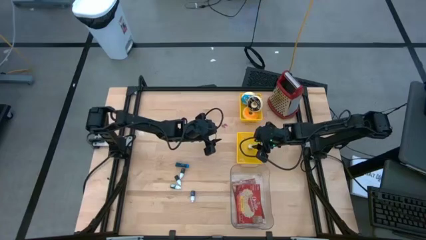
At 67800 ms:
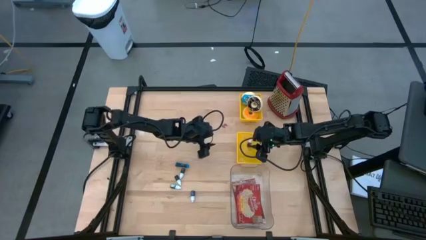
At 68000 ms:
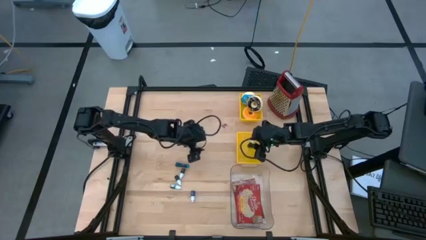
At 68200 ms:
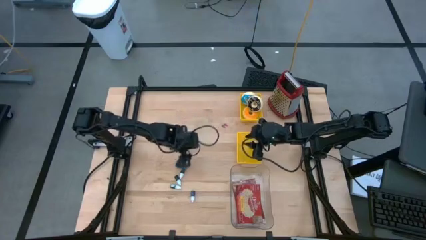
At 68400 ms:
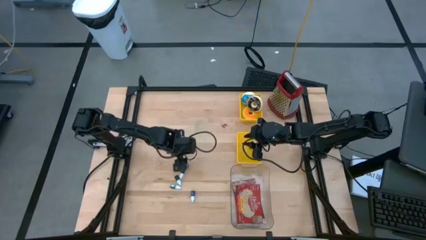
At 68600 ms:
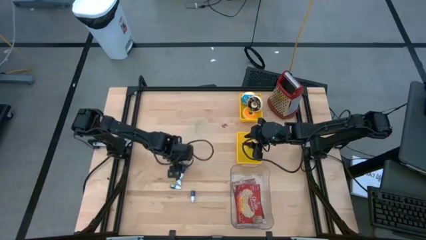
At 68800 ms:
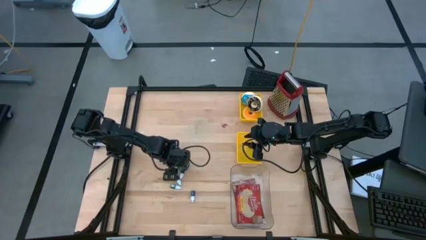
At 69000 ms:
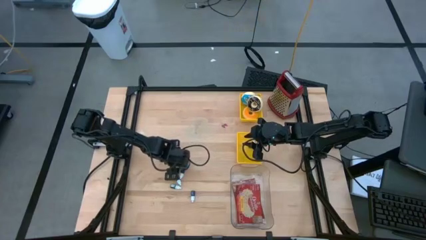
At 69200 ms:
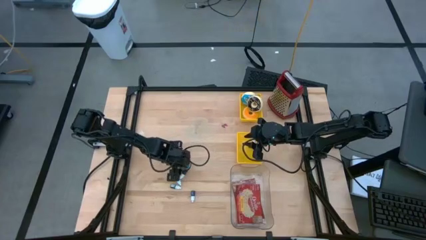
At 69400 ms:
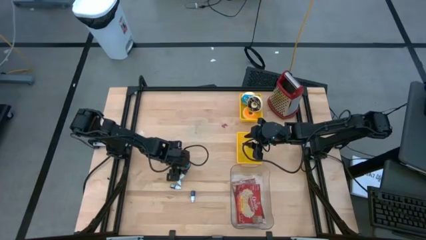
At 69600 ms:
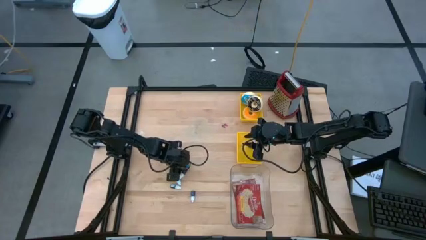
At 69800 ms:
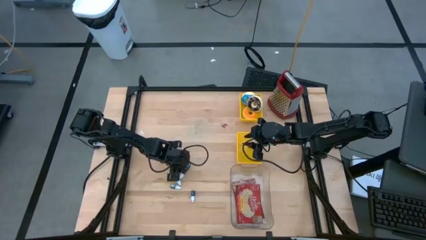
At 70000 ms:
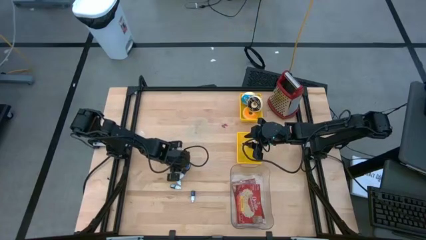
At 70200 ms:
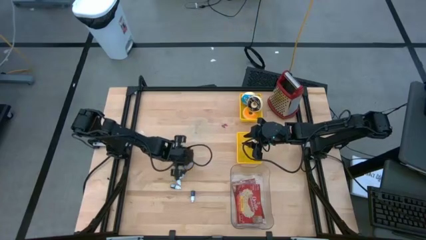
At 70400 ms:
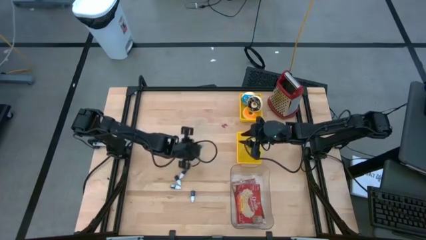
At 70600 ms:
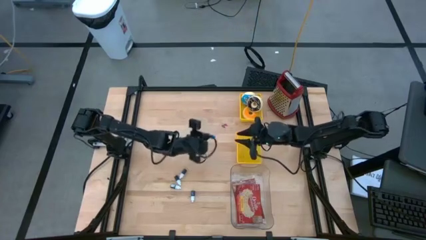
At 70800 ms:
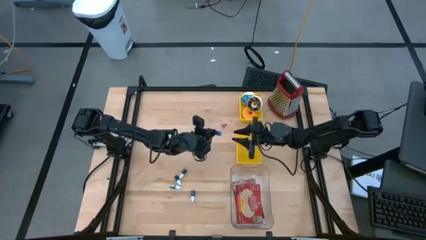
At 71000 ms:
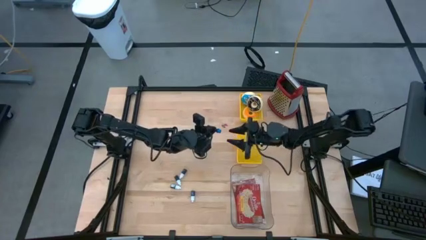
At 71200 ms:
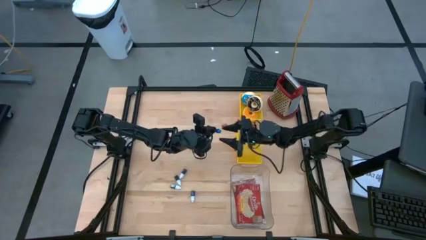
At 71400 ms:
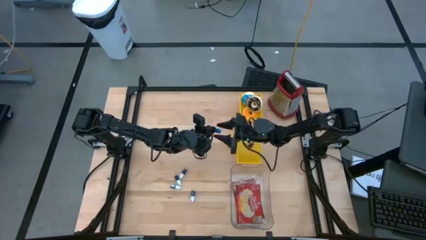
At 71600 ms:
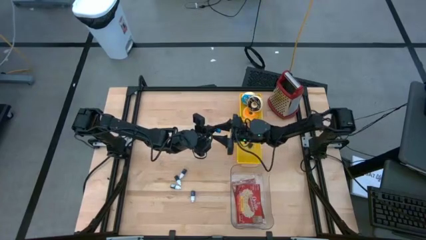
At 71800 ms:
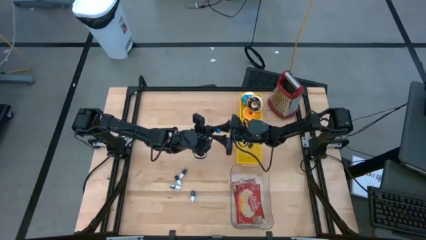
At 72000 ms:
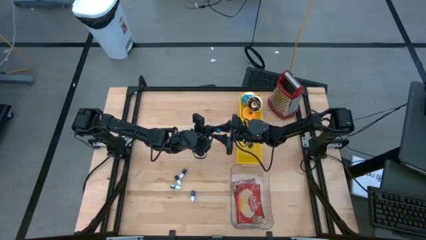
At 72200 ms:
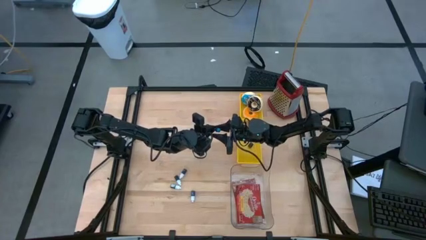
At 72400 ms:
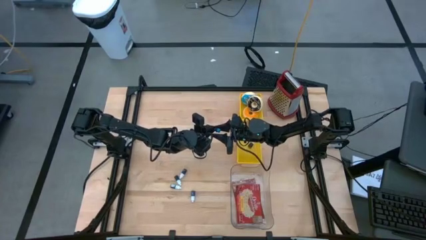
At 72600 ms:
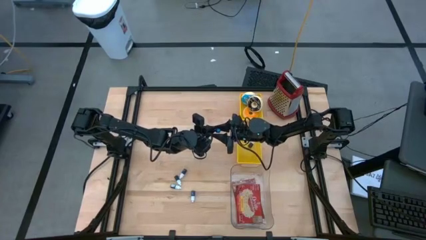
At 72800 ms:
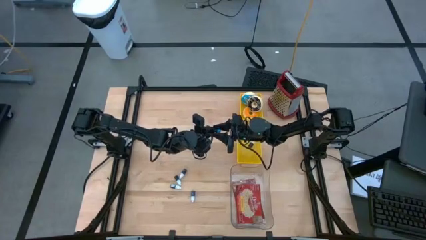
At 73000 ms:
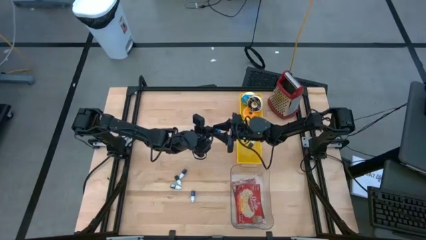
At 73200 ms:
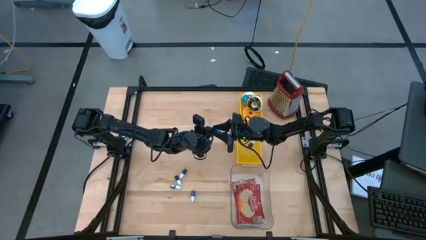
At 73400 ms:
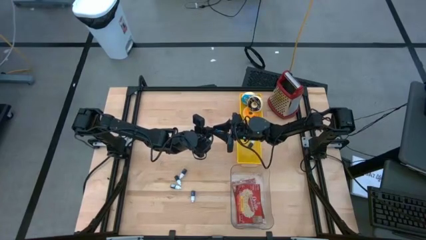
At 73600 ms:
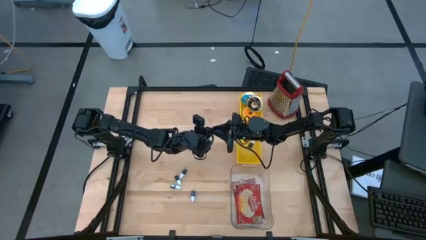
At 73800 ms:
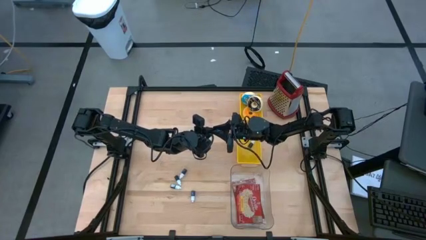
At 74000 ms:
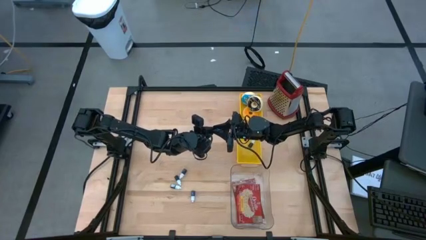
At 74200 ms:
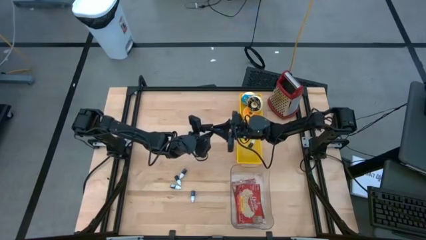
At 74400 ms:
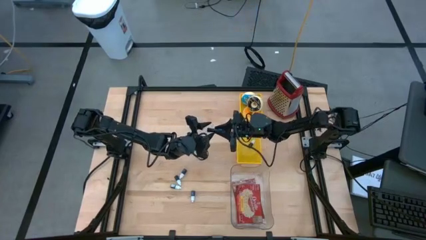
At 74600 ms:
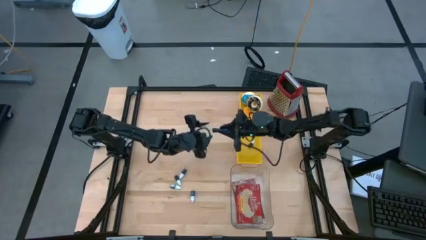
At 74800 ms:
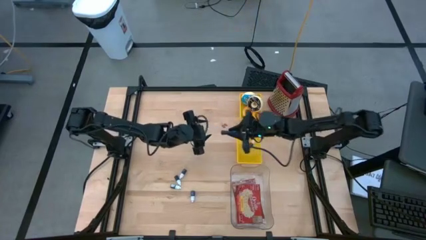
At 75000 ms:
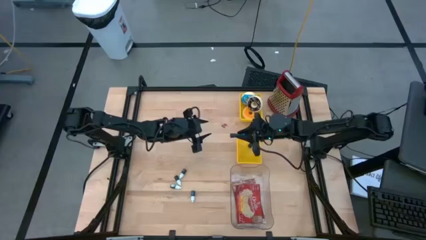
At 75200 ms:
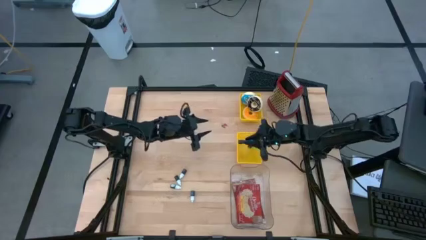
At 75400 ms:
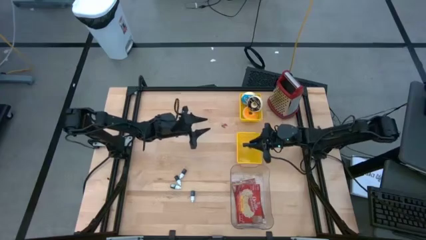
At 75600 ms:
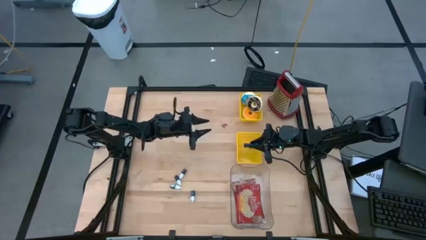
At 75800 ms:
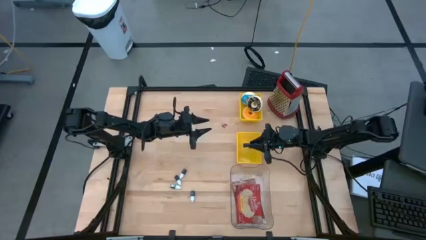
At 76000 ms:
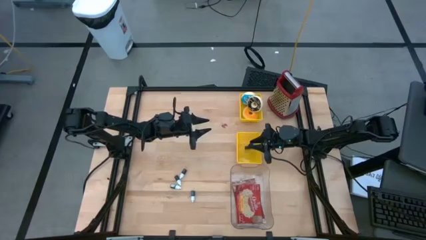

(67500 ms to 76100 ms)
Put the top blue food coloring bottle into the bottom yellow bin

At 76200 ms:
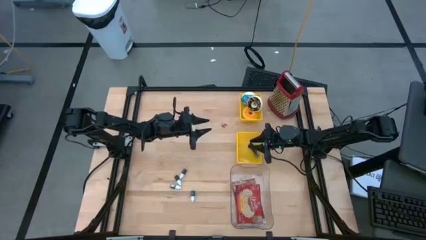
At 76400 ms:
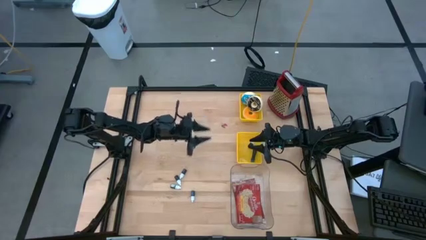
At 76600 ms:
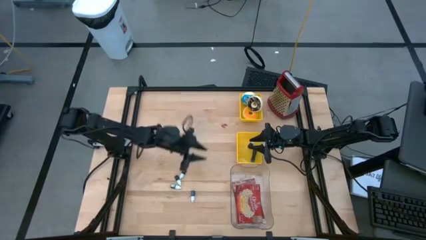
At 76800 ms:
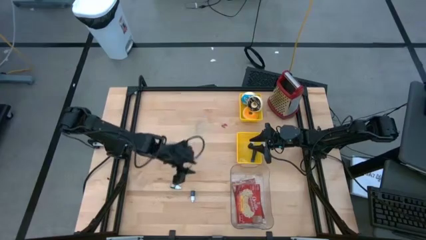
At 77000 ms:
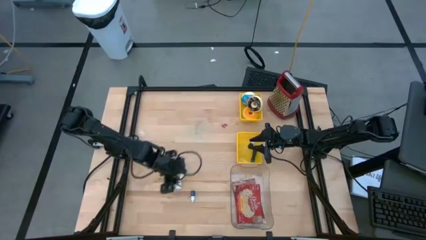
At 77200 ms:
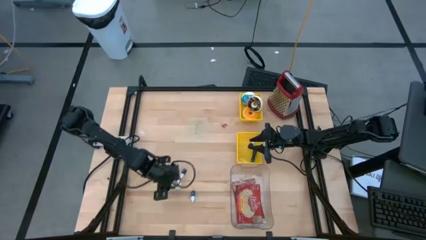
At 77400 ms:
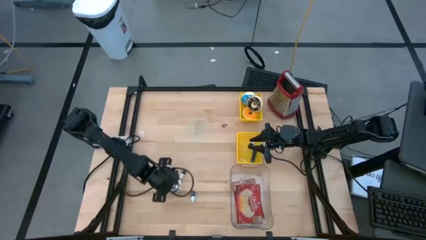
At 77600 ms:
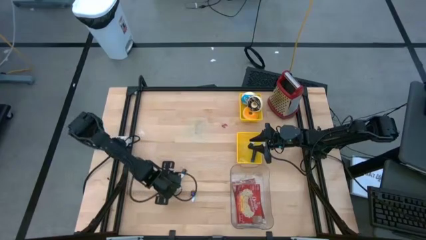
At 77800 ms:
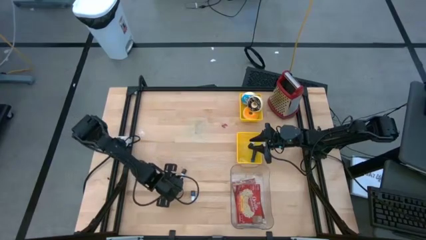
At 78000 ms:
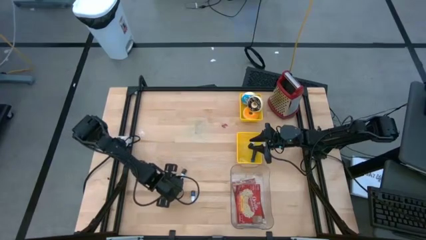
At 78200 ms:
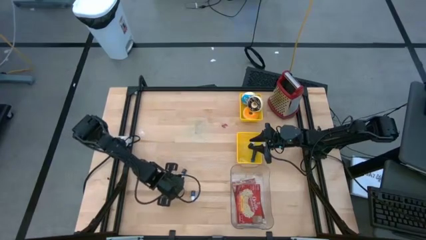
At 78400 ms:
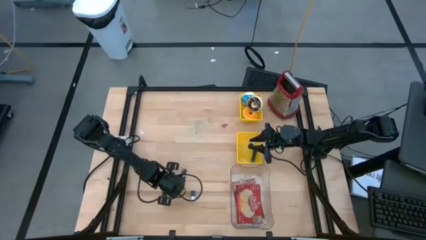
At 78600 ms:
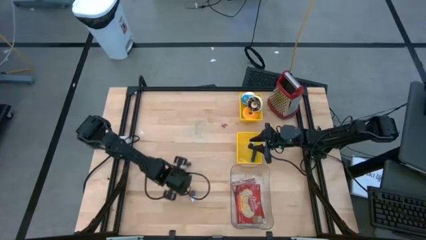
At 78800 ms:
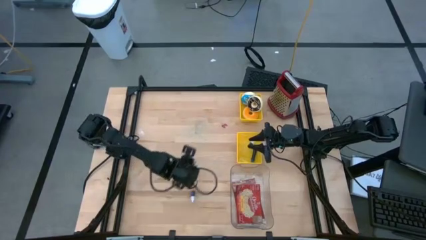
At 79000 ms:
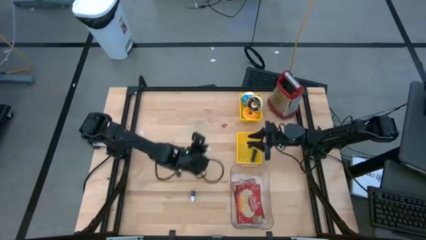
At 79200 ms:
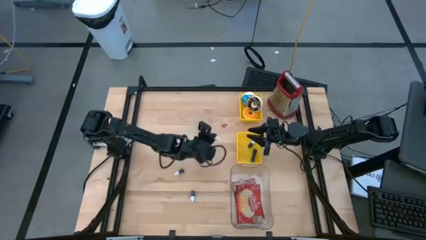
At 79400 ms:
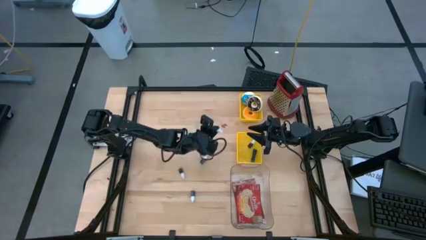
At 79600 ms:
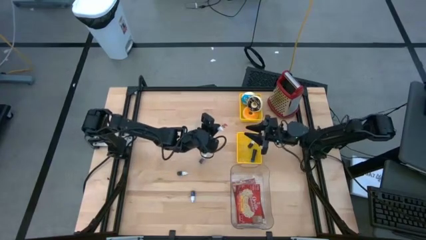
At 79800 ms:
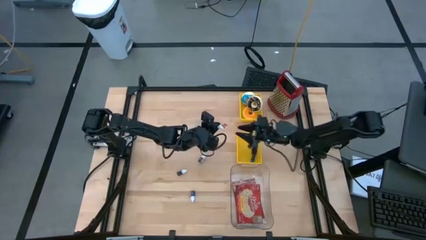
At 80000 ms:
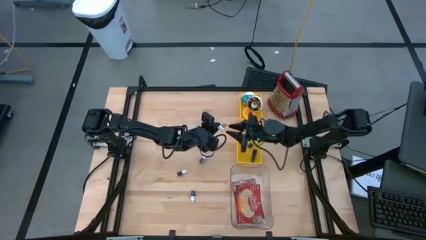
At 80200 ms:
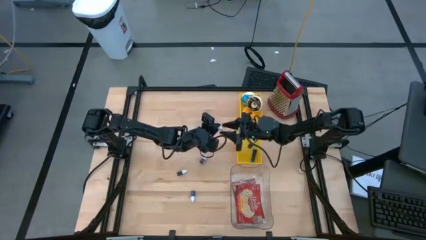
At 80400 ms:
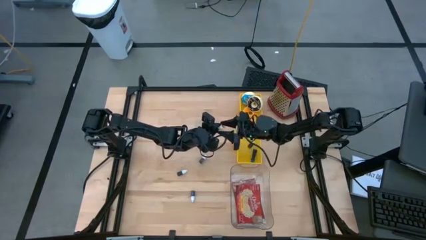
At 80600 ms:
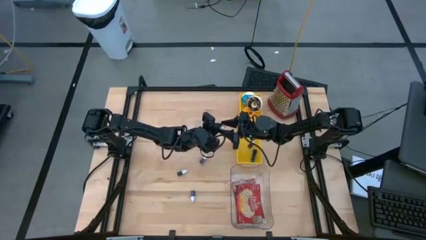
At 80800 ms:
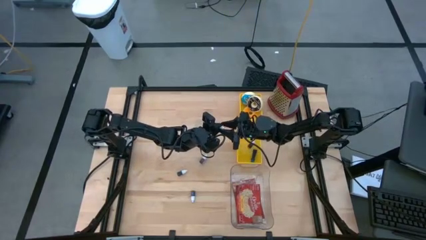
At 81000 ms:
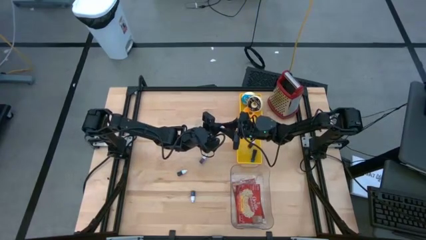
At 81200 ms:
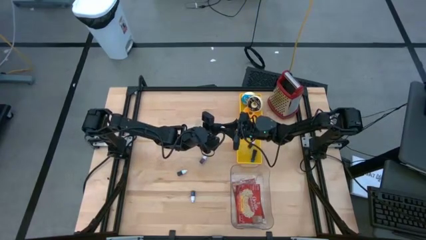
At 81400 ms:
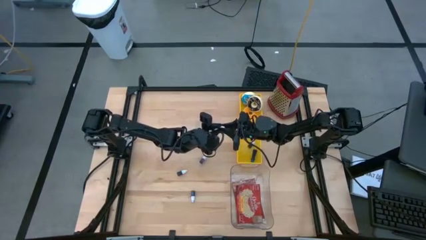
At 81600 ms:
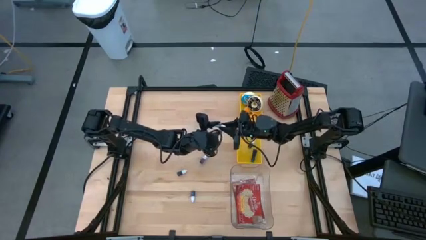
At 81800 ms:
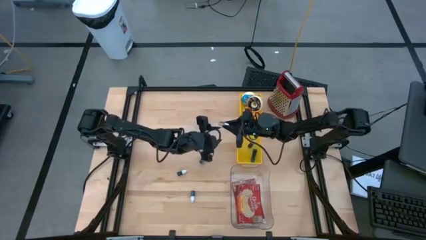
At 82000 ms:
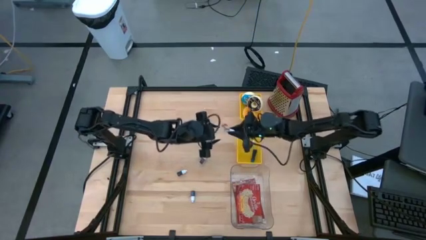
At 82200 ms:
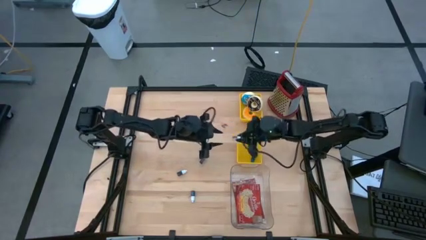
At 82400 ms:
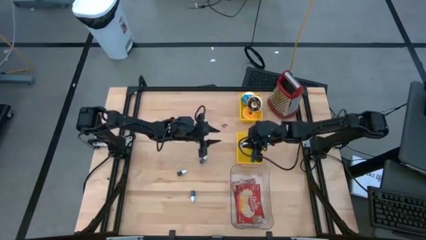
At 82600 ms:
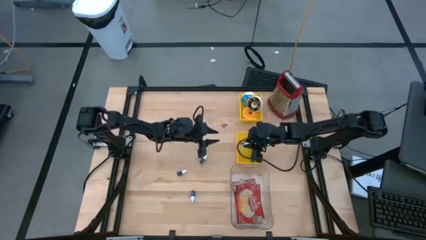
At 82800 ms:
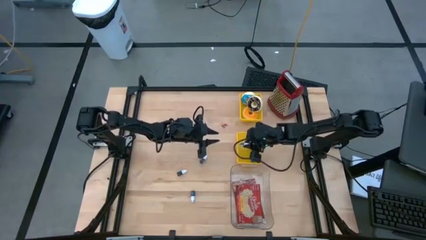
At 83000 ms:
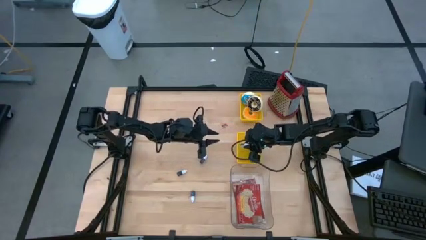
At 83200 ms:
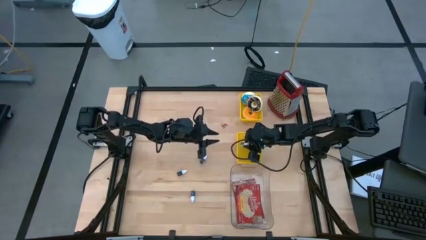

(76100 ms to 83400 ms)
Put the brown food coloring bottle into the bottom yellow bin
